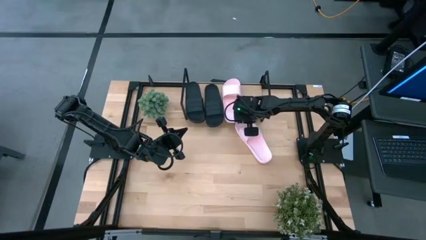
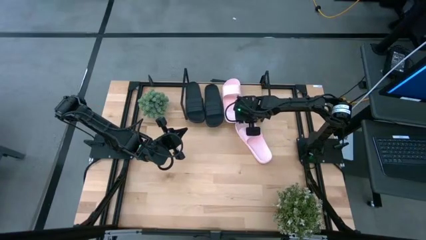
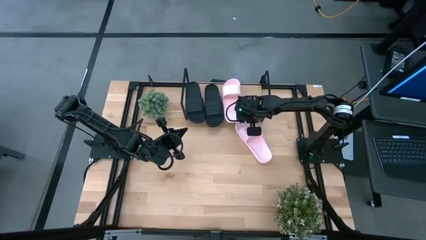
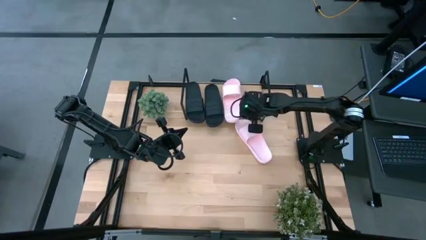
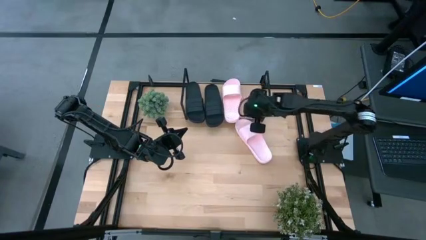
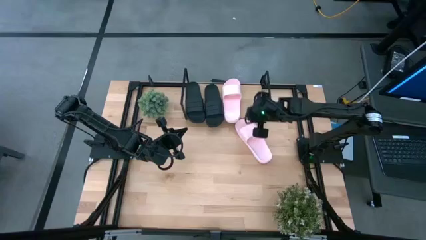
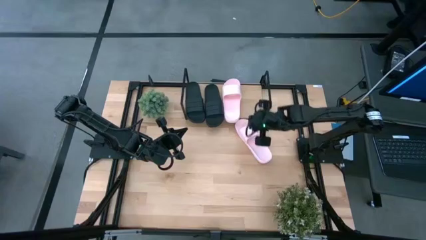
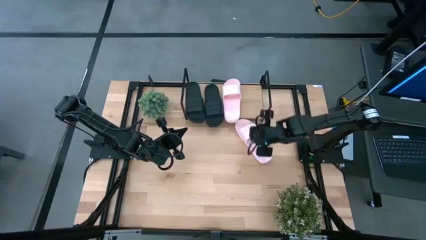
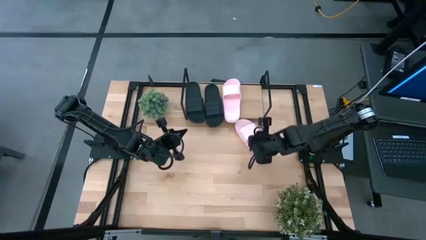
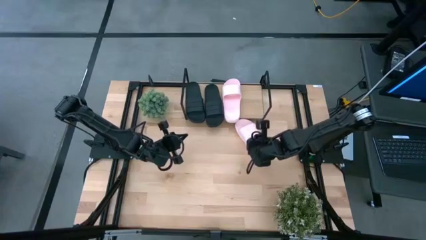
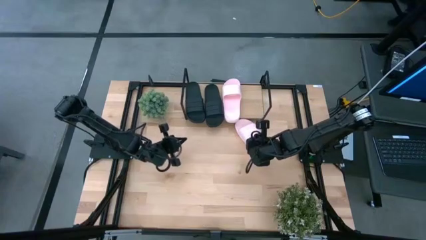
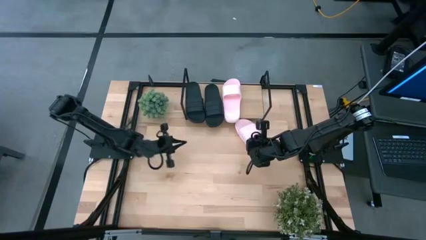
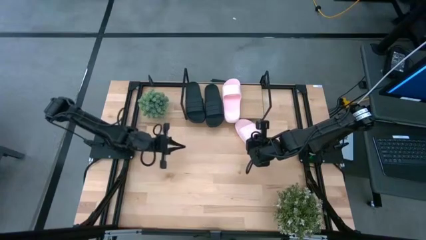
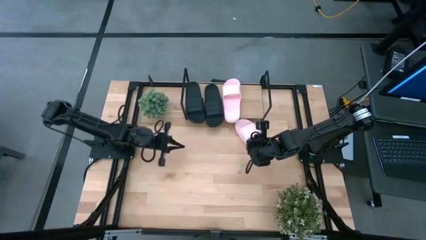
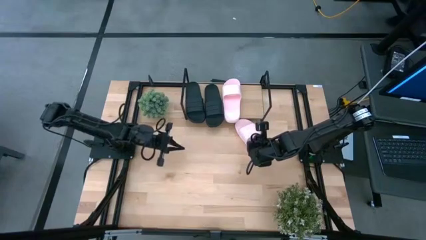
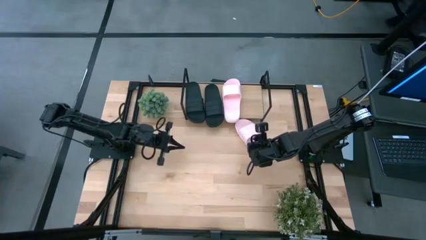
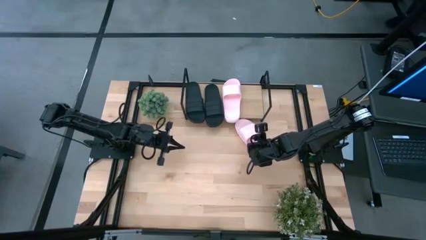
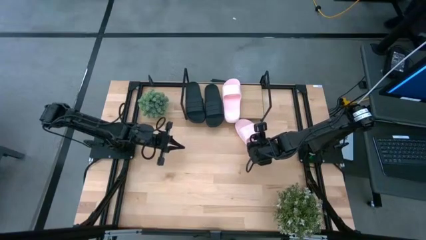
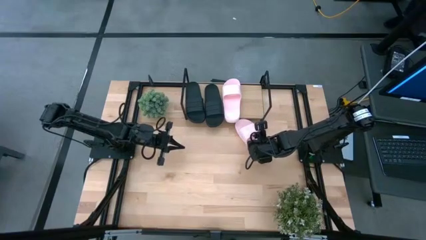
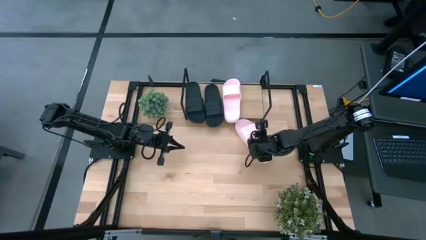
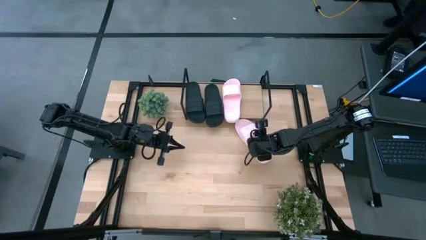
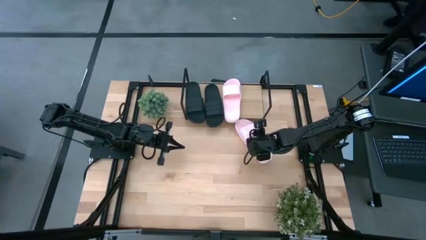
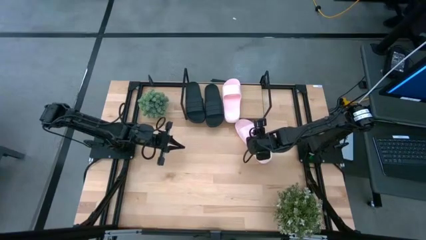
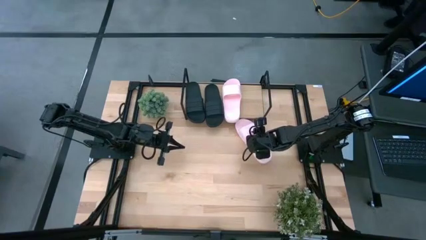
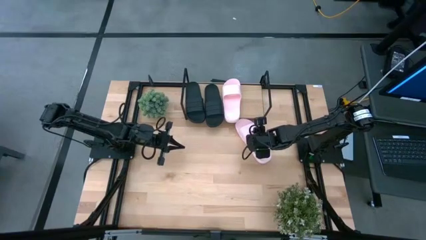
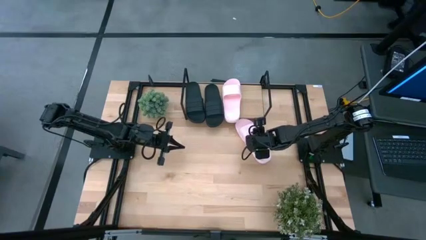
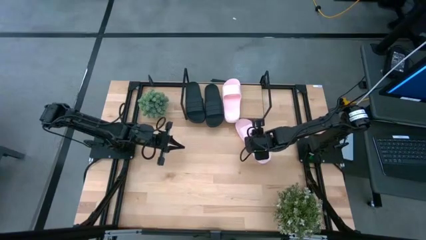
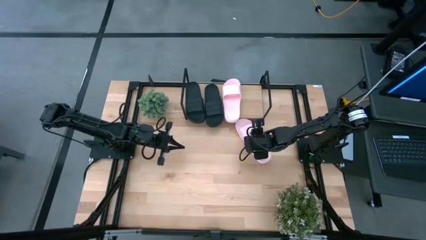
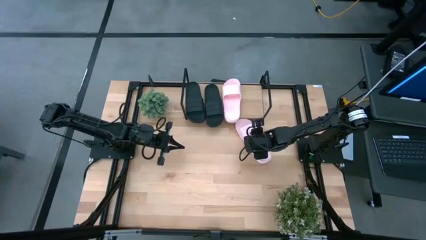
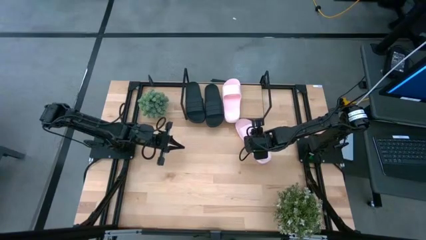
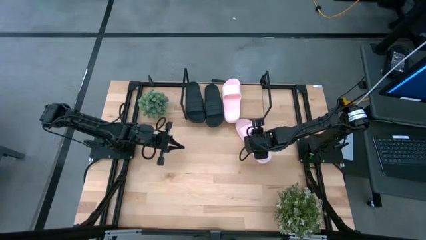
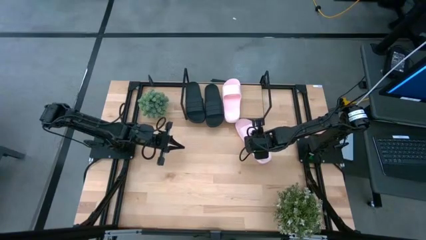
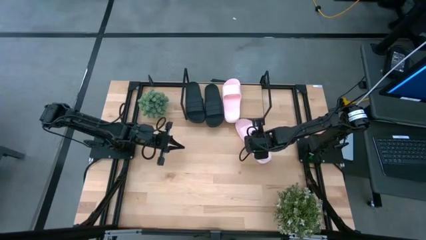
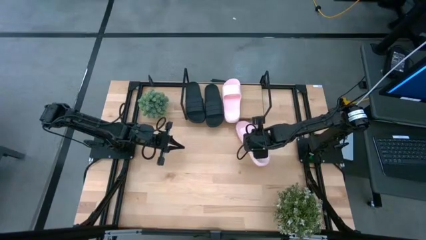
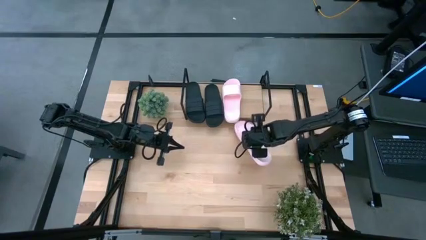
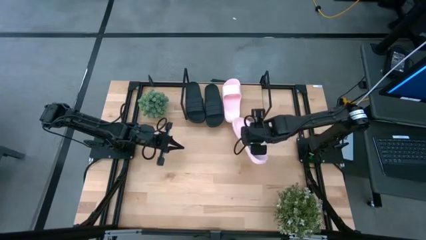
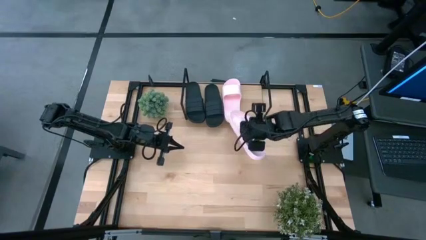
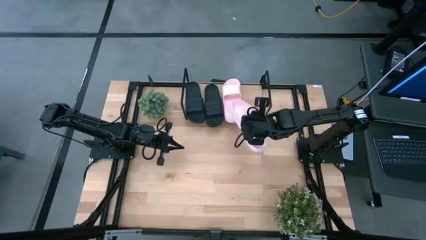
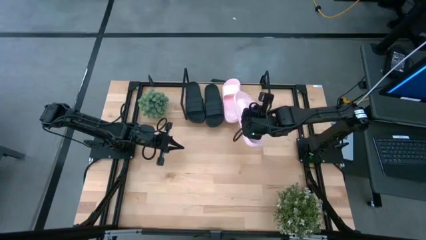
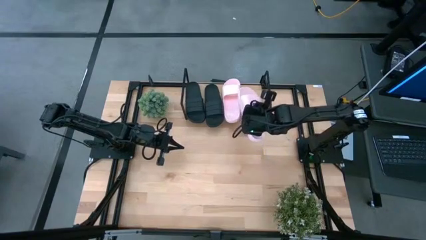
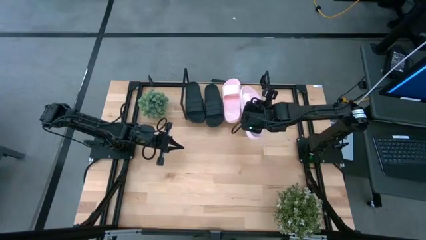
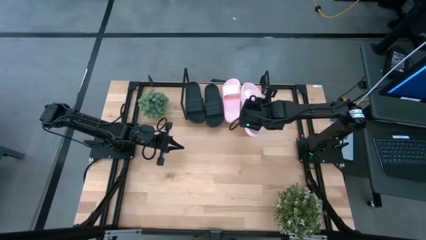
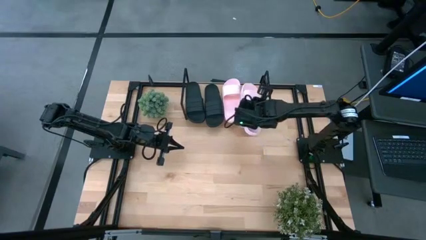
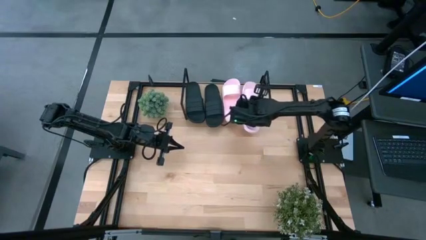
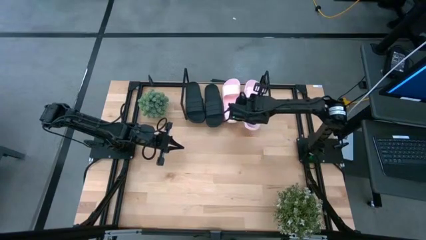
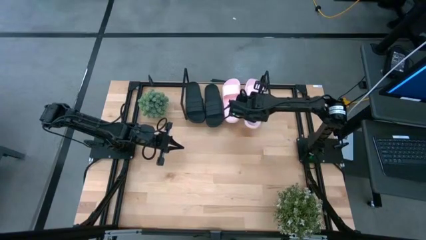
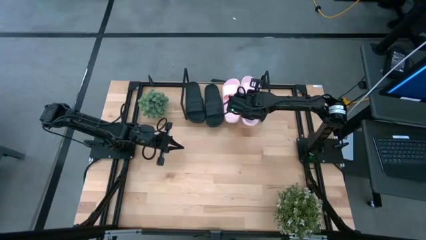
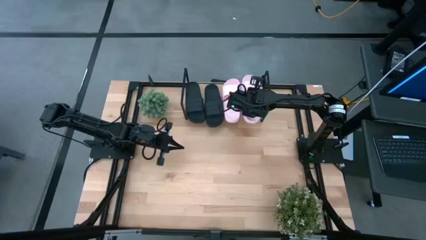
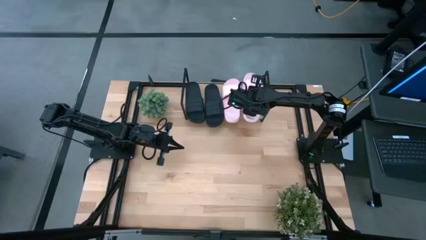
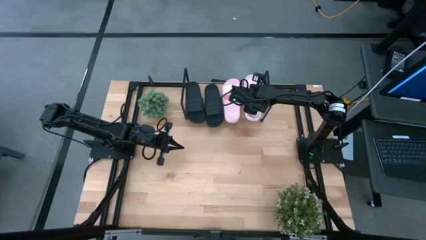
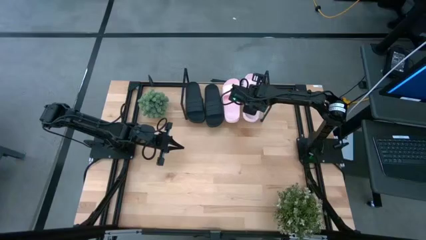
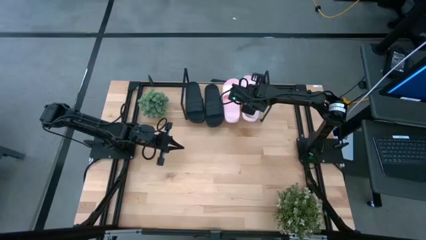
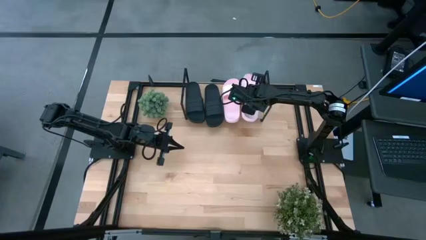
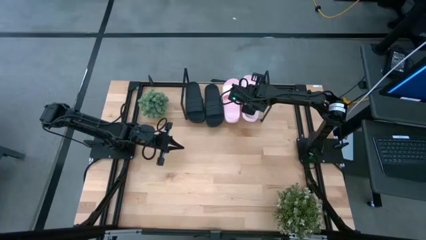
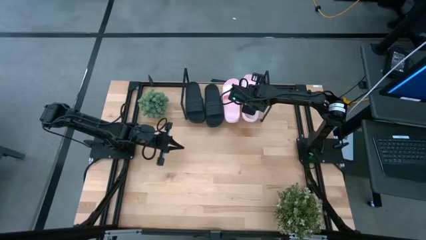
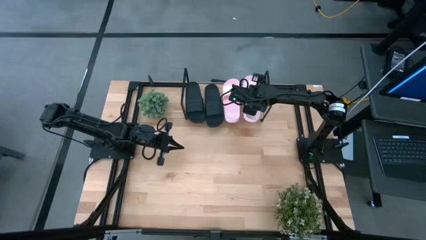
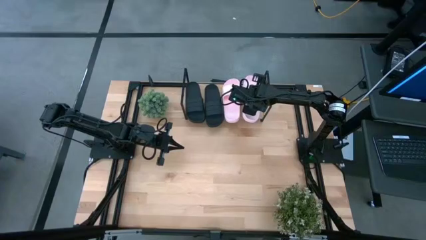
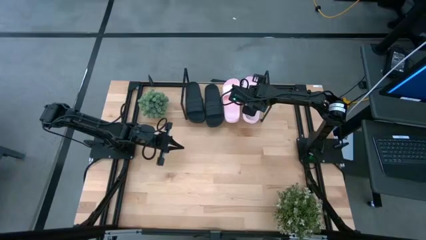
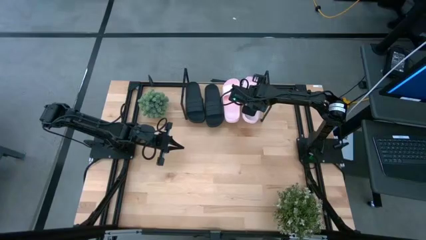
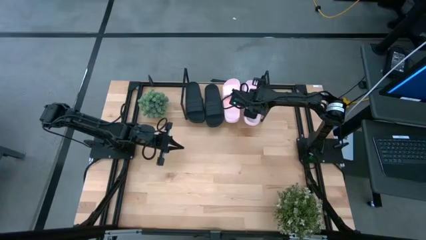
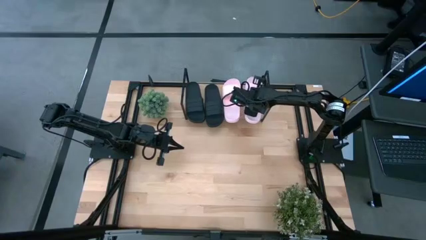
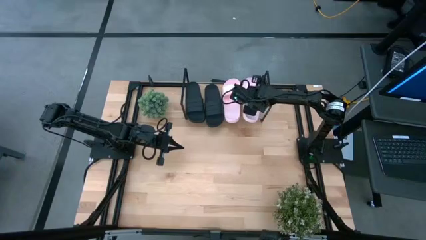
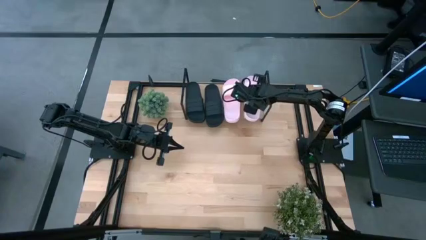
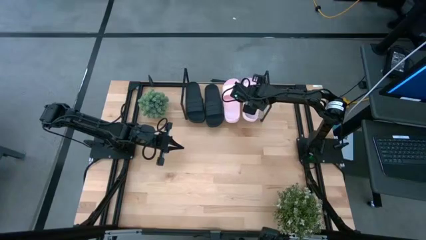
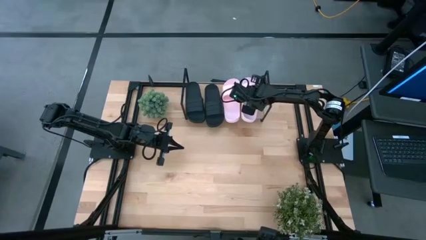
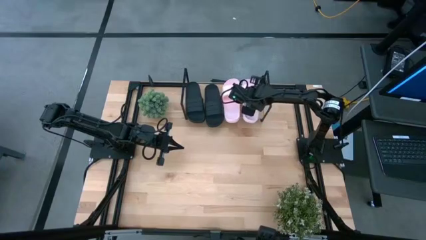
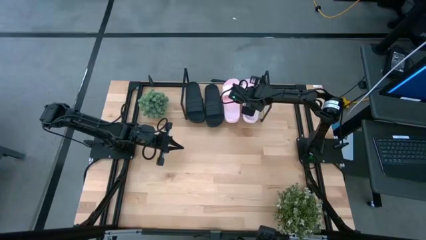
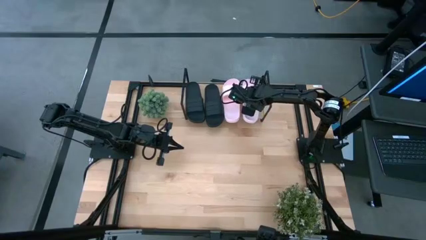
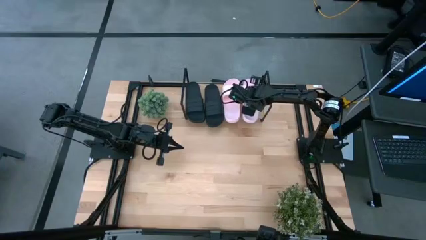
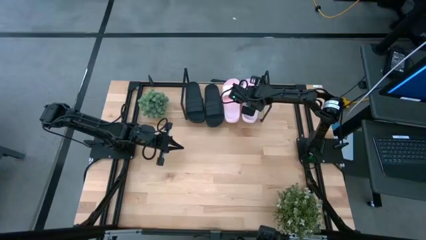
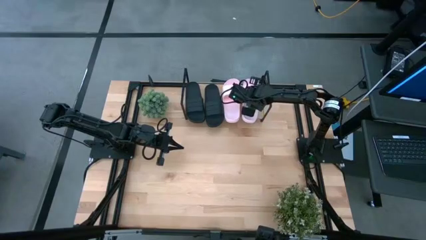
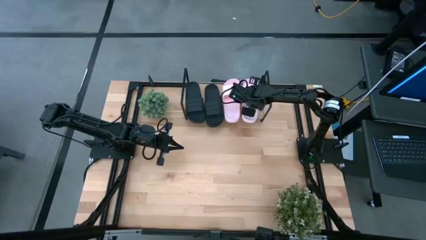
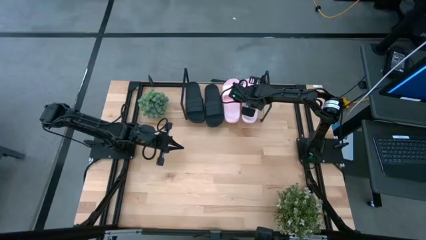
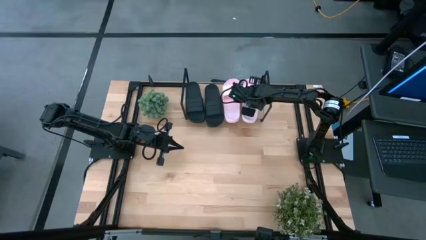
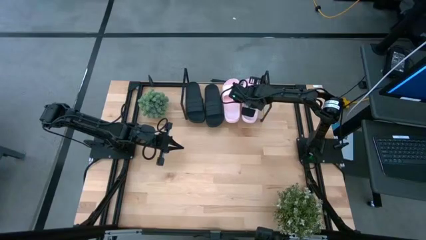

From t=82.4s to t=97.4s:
Task: Pick and place slides into the shelf
Put the pink slide on the shelf
